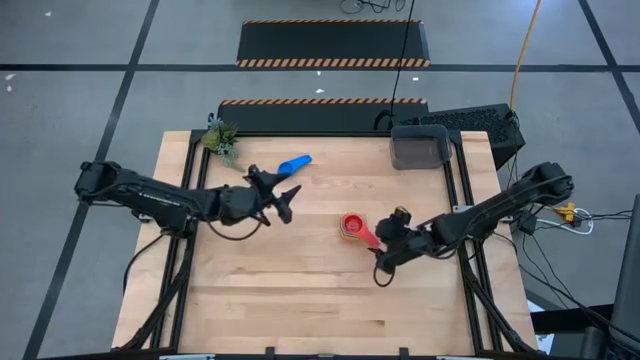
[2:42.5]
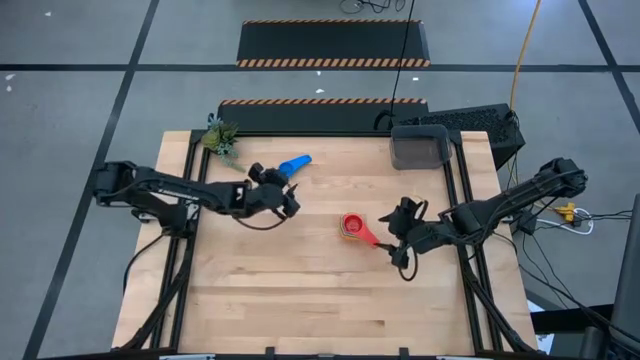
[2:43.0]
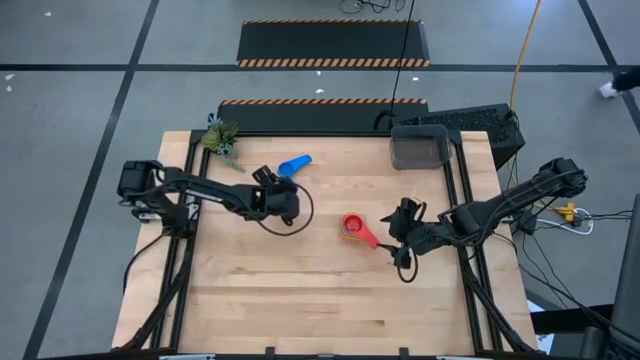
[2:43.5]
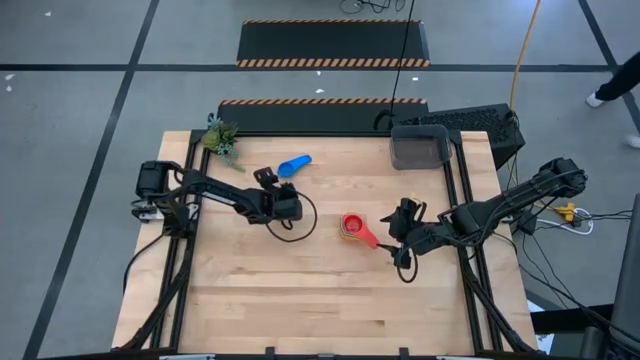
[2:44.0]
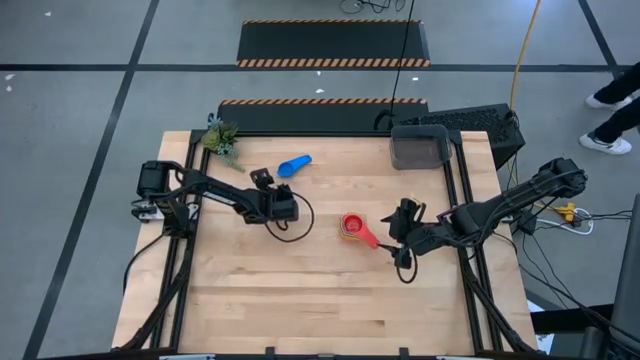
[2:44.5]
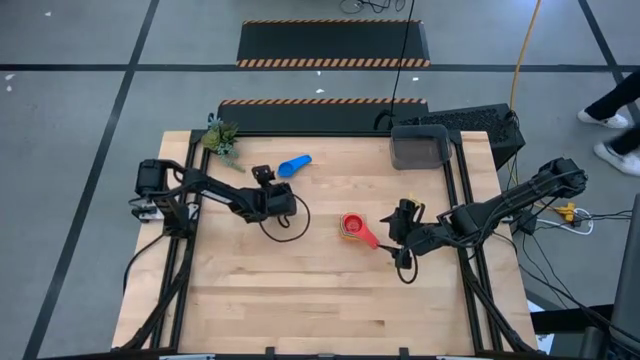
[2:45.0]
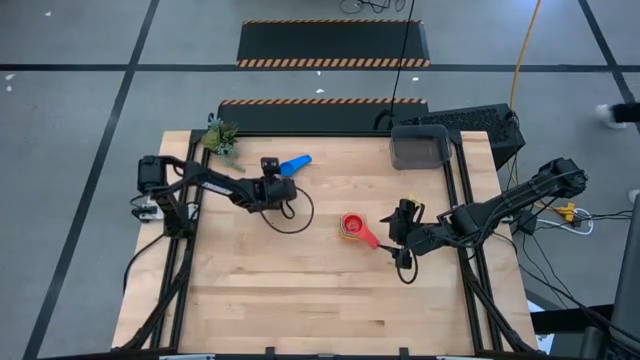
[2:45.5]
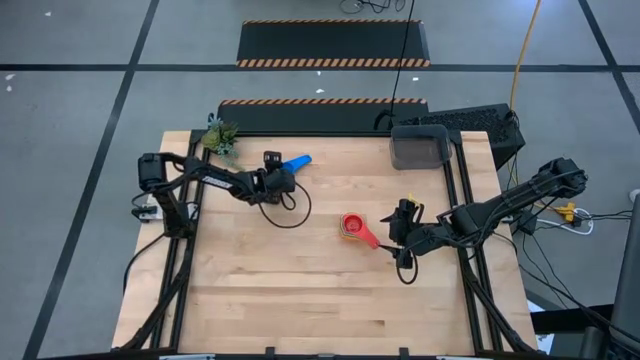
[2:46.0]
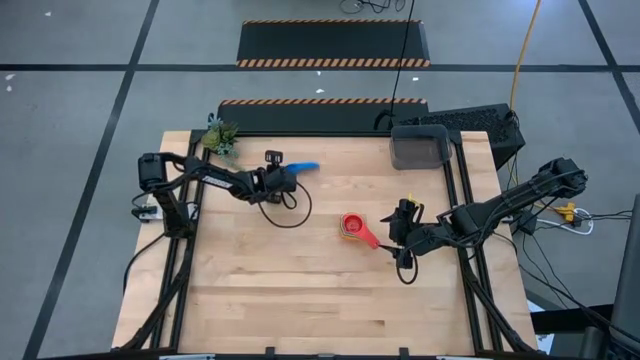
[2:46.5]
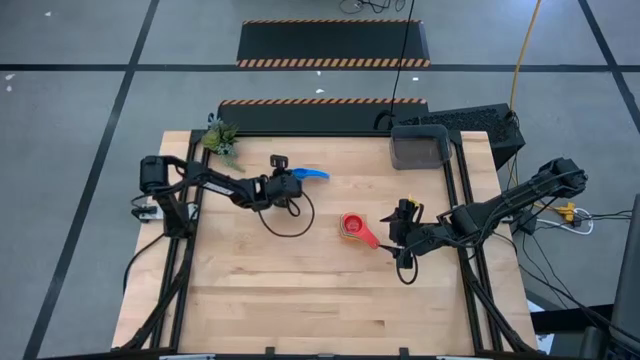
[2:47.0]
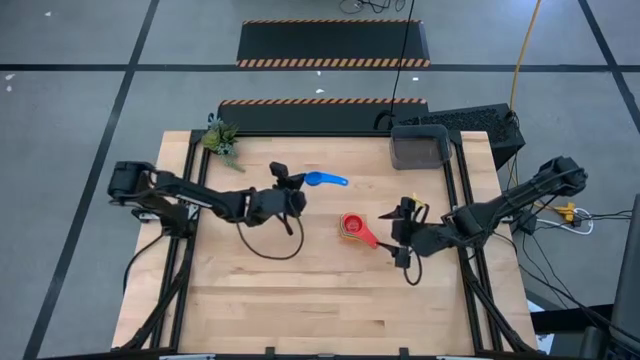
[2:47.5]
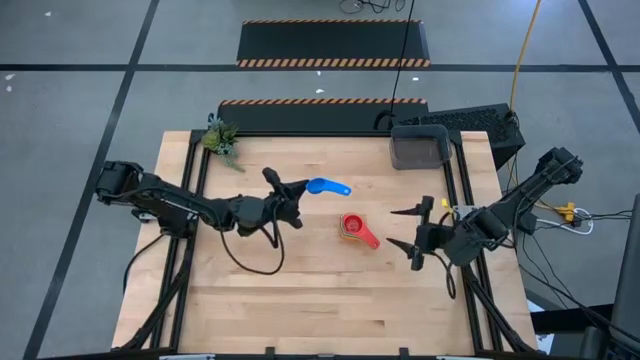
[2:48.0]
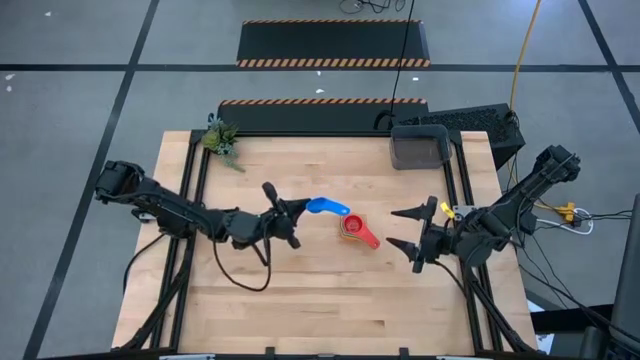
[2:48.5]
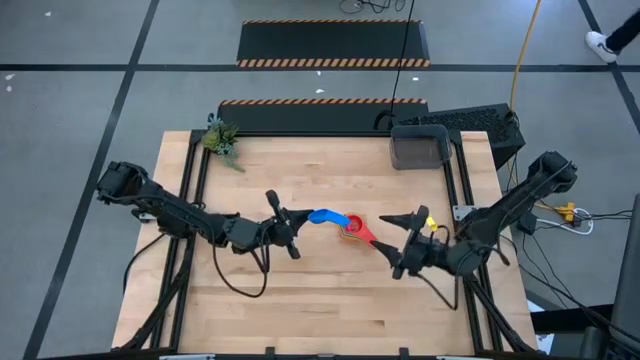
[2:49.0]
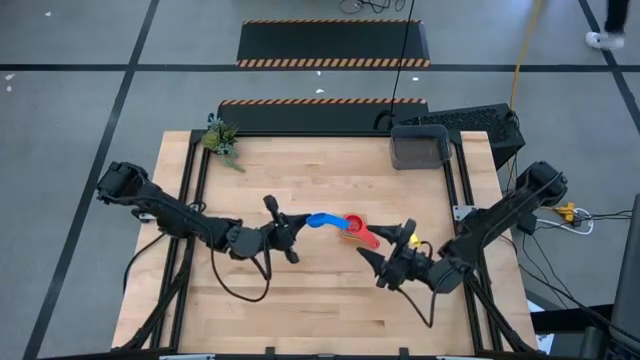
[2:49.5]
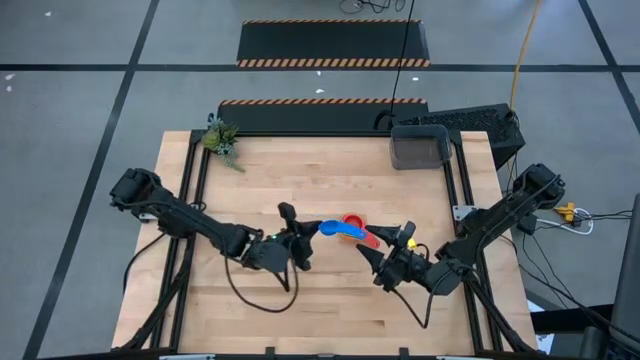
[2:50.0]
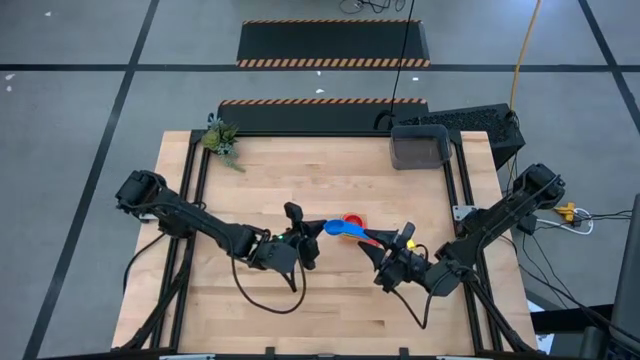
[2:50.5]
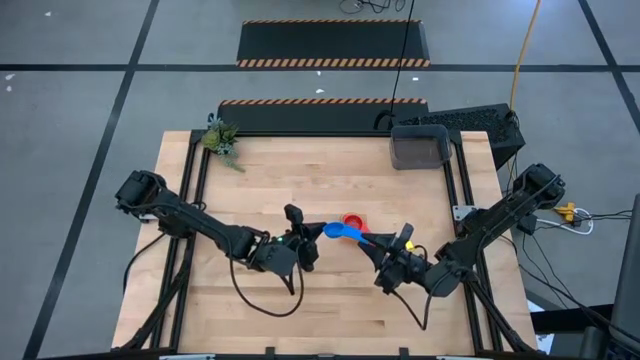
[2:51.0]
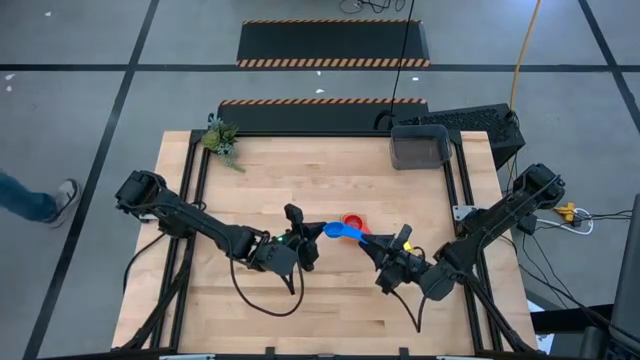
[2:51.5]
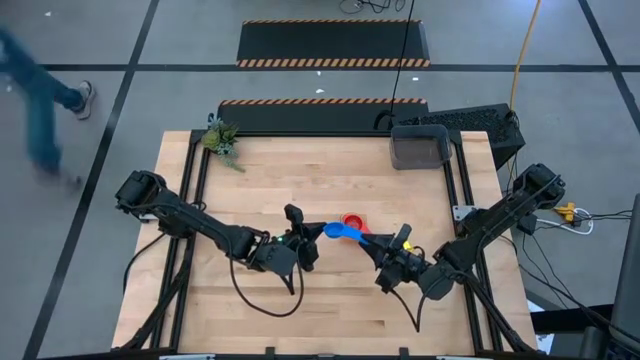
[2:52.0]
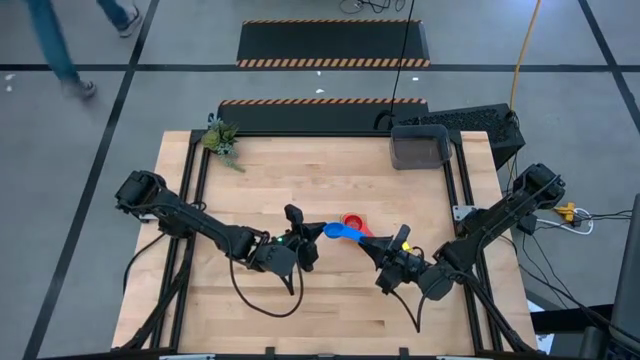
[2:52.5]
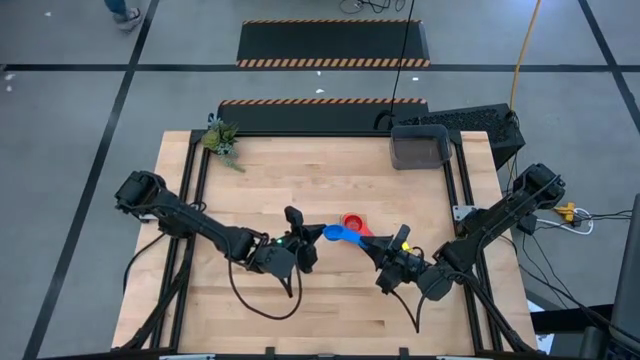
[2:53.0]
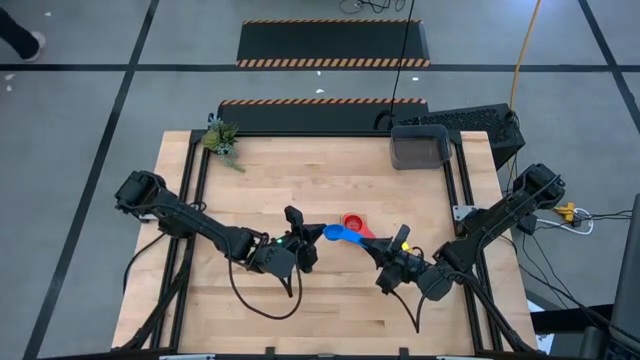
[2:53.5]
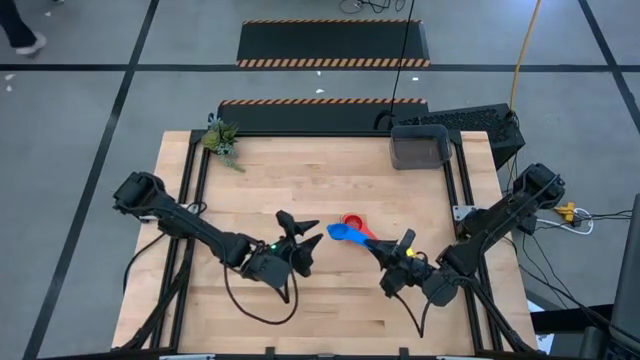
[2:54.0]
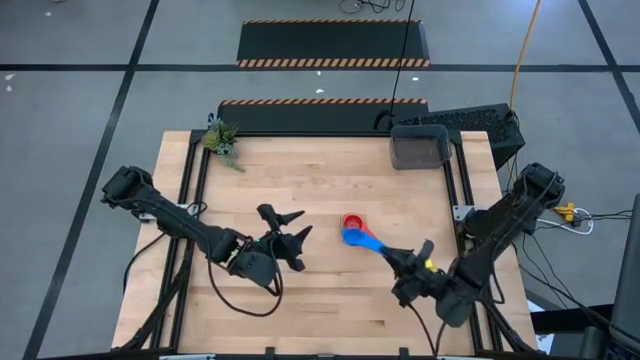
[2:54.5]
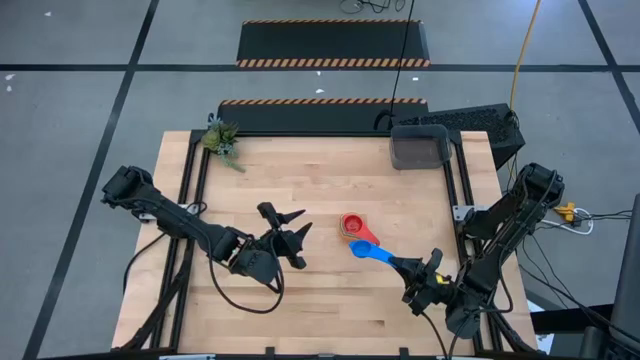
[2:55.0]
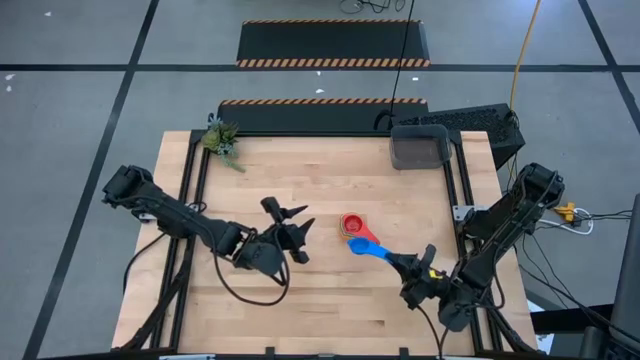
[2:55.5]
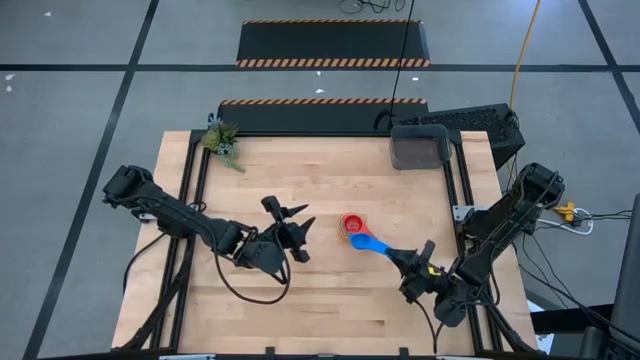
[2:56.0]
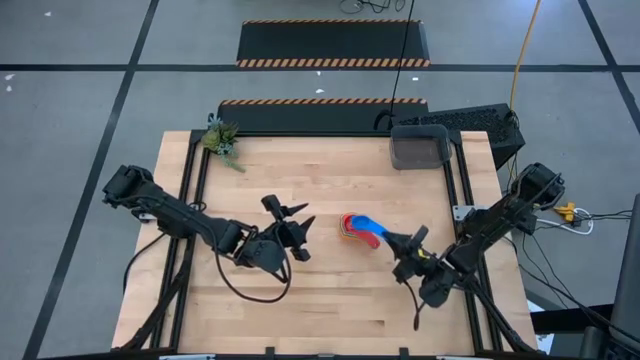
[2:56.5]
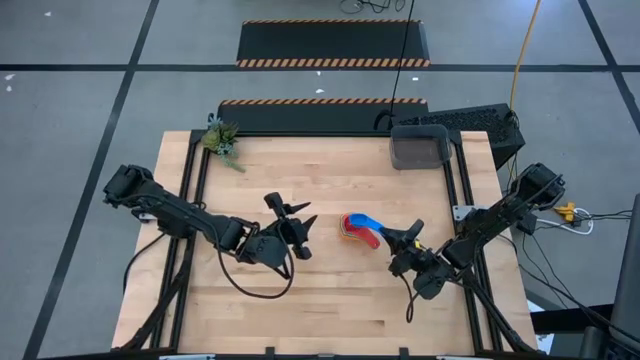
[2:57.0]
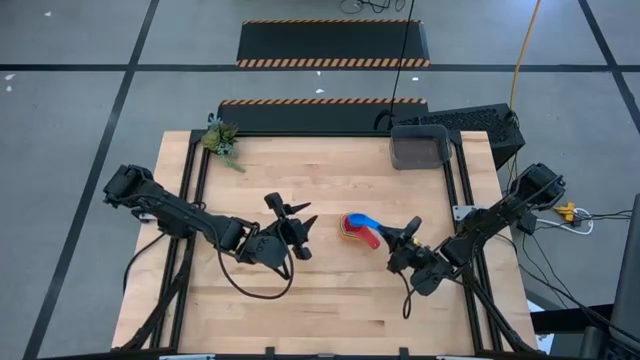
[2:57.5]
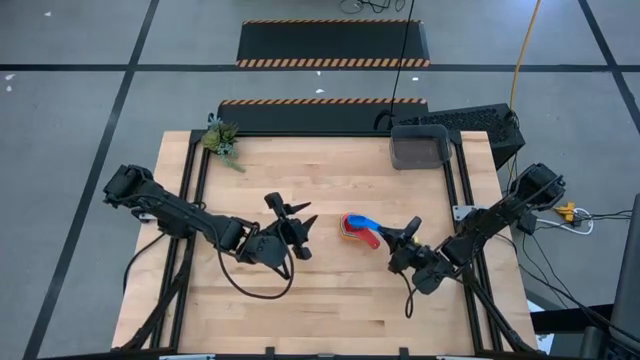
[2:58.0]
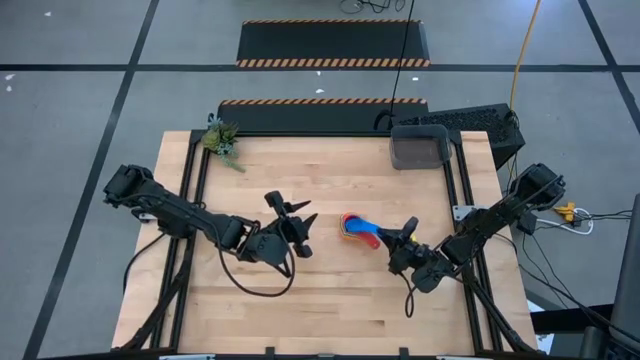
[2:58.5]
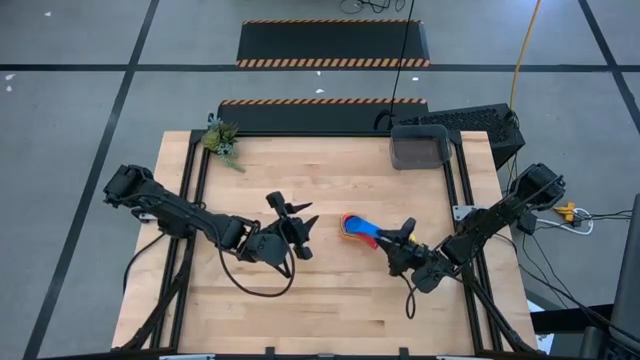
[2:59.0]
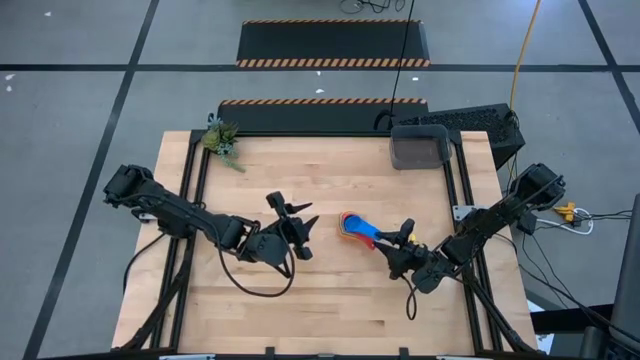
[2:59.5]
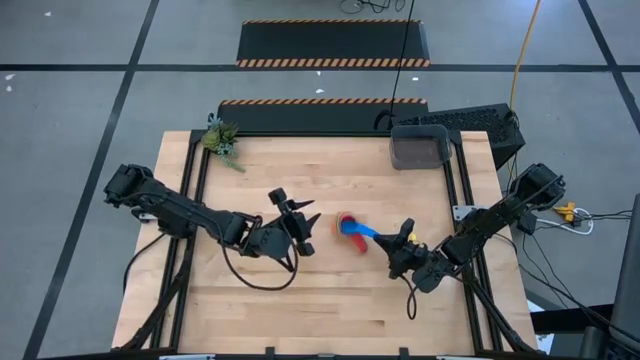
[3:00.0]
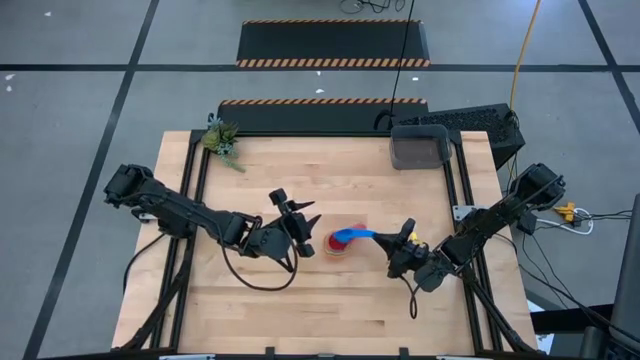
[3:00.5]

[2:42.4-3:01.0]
Task: Nest measuring cups in basket
Stack the blue measuring cup on top of the light red measuring cup

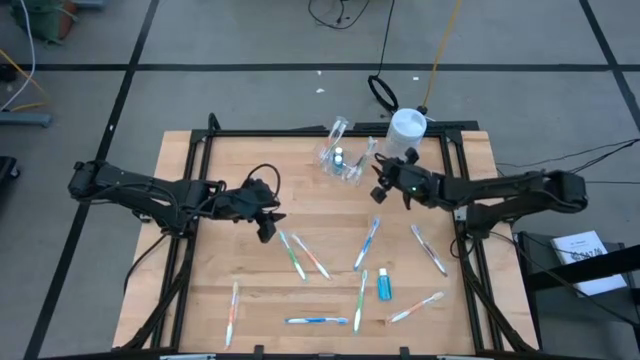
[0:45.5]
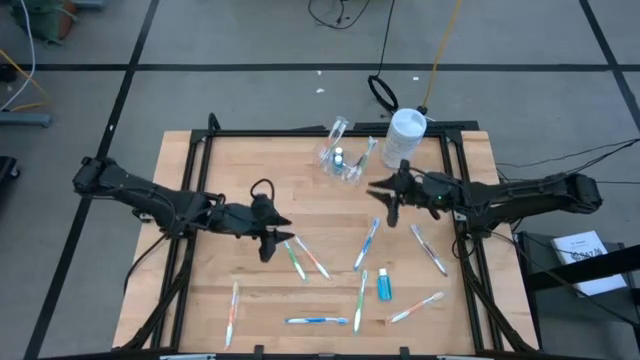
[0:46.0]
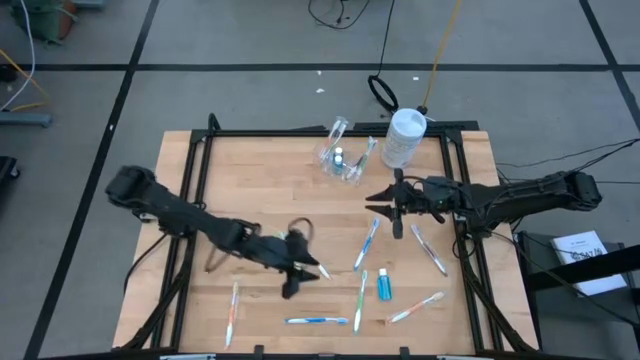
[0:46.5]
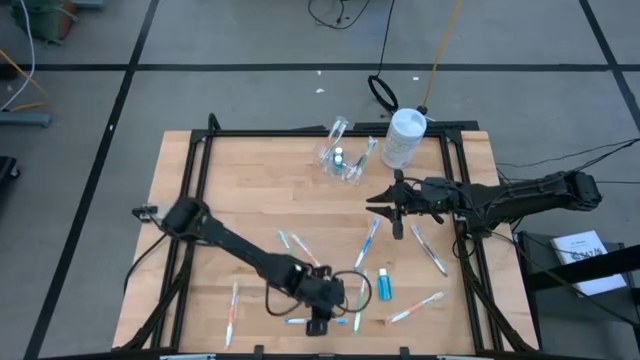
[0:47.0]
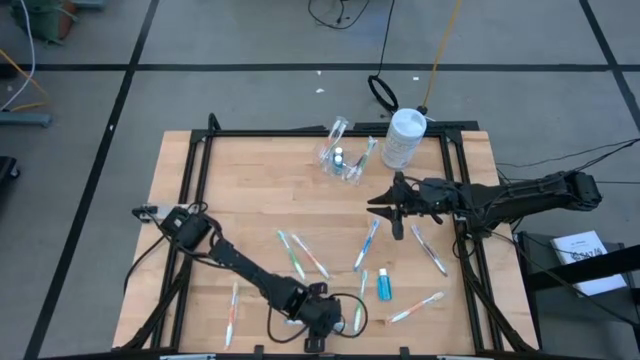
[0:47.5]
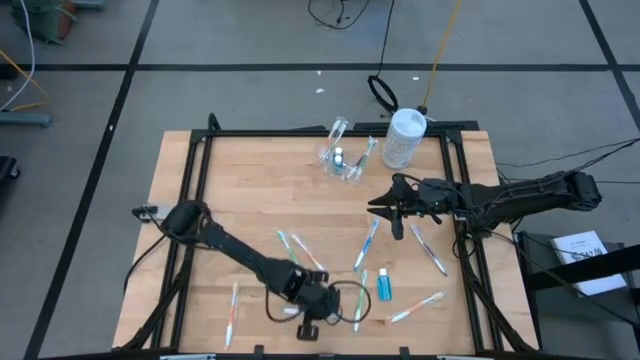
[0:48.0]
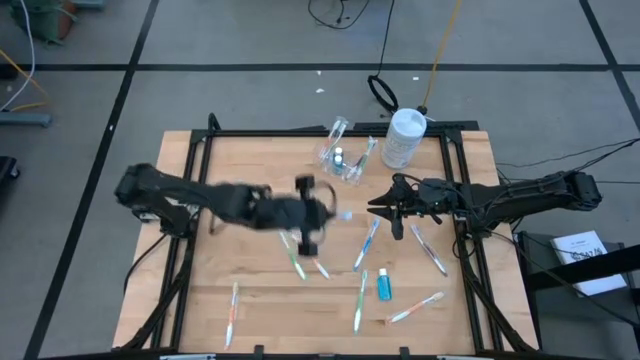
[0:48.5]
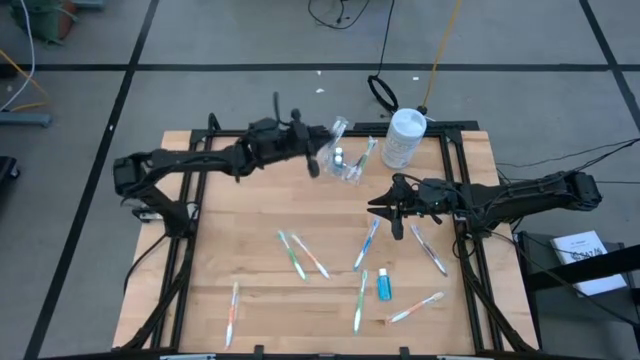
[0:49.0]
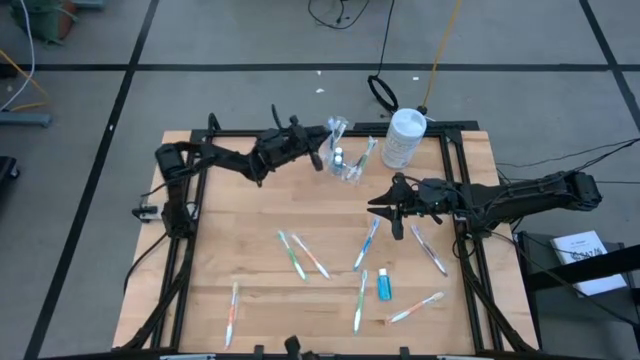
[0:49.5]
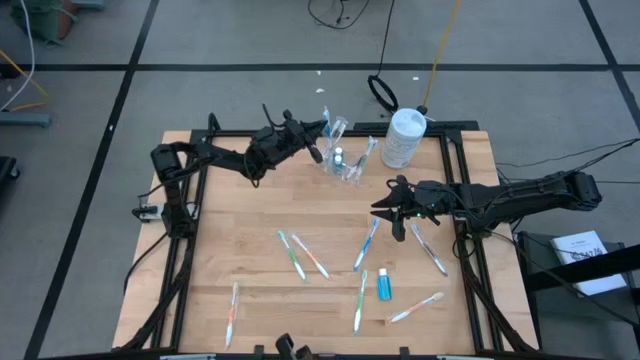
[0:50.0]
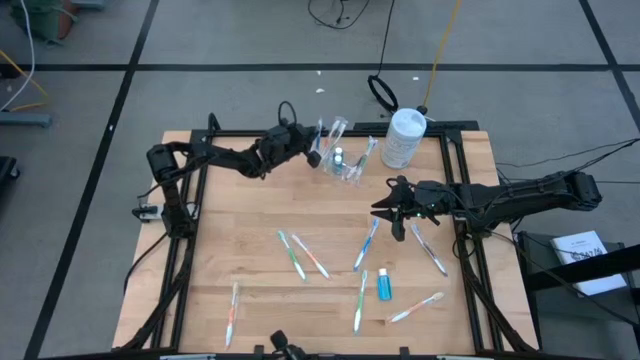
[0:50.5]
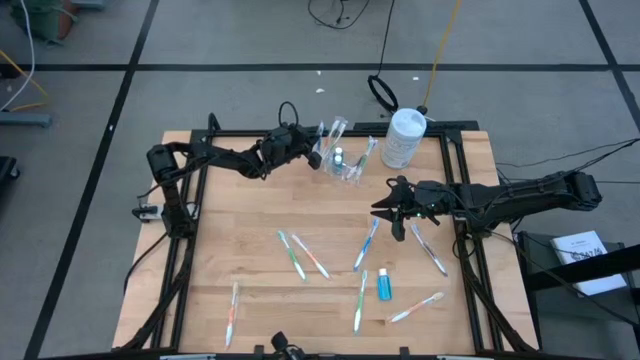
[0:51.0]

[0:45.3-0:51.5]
Task: Pick & Place toothbrushing station
Put the blue toothbrush into the transparent organizer
